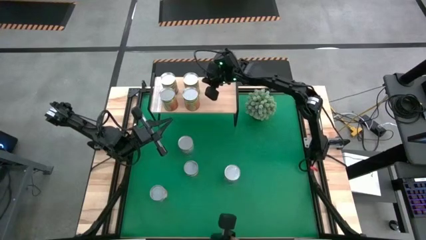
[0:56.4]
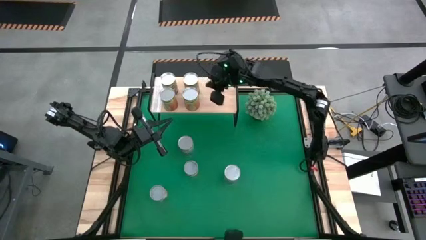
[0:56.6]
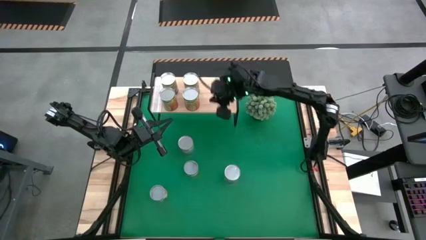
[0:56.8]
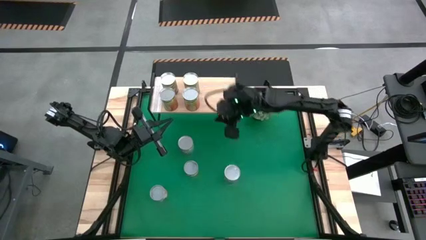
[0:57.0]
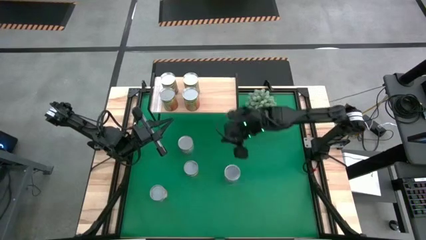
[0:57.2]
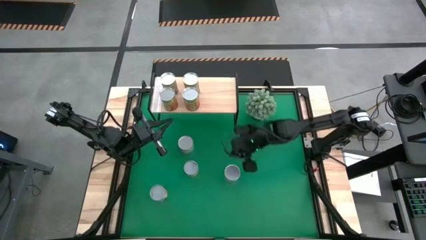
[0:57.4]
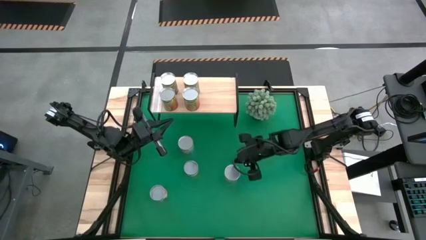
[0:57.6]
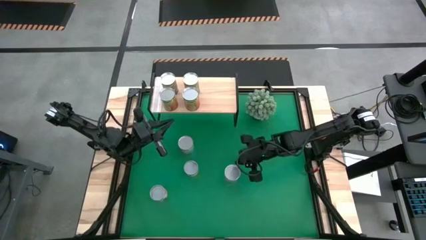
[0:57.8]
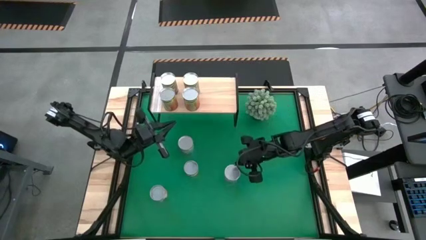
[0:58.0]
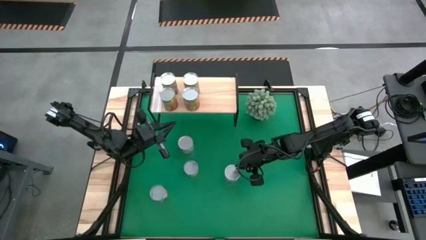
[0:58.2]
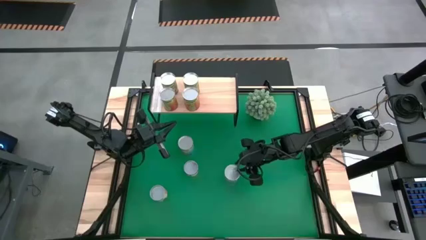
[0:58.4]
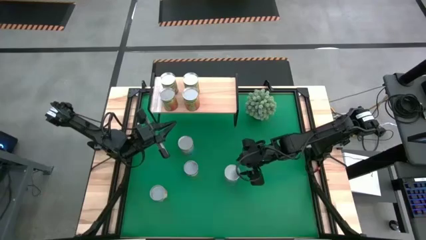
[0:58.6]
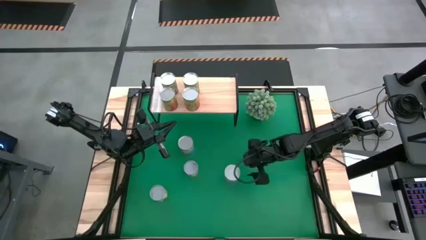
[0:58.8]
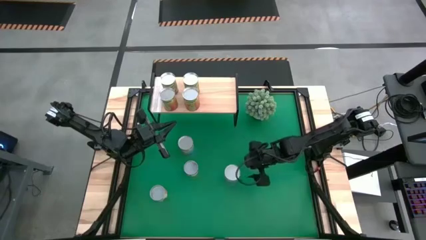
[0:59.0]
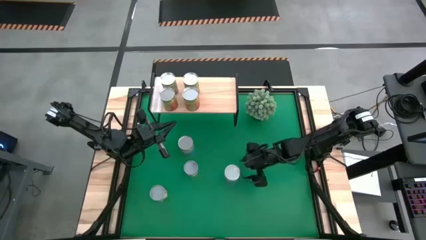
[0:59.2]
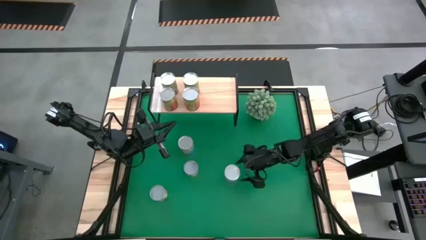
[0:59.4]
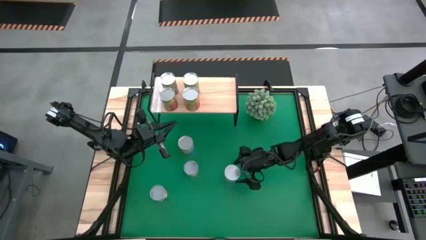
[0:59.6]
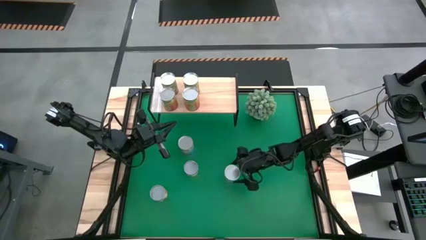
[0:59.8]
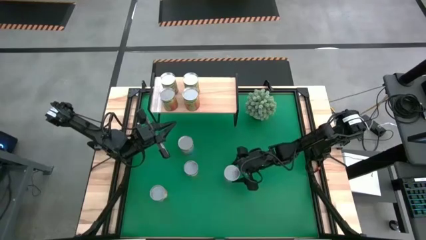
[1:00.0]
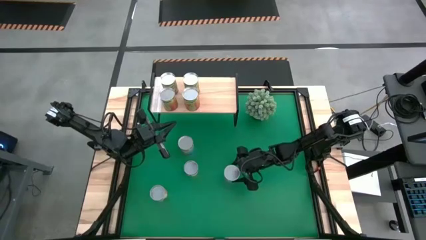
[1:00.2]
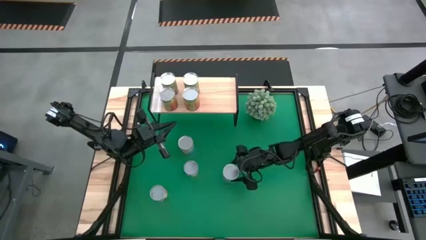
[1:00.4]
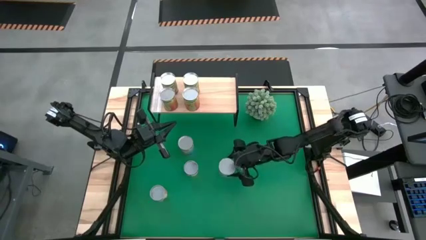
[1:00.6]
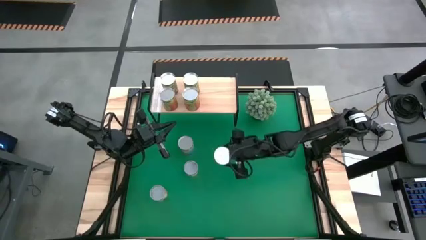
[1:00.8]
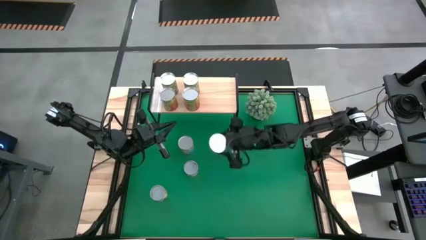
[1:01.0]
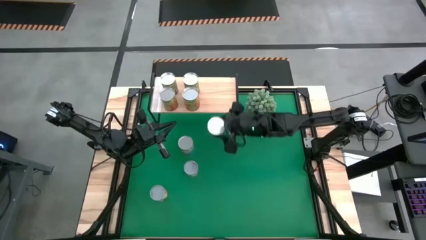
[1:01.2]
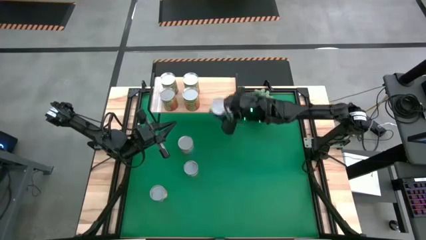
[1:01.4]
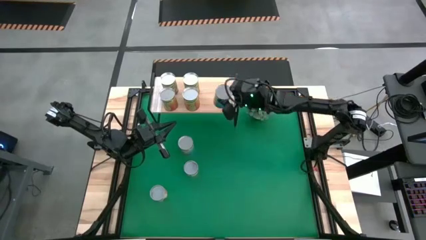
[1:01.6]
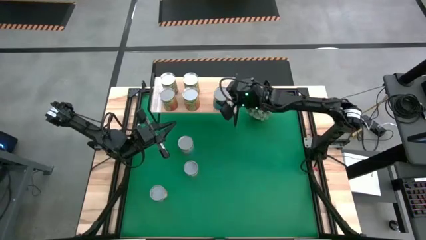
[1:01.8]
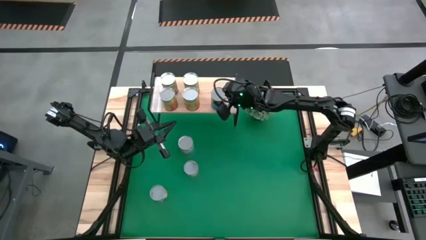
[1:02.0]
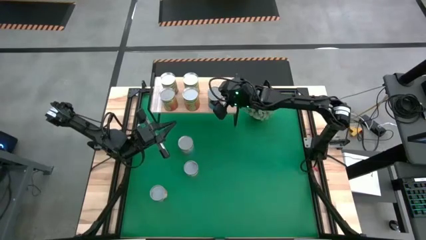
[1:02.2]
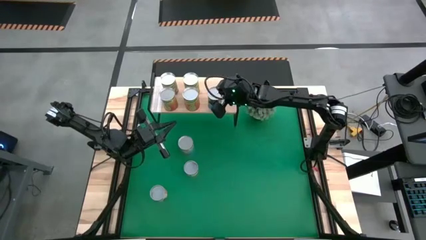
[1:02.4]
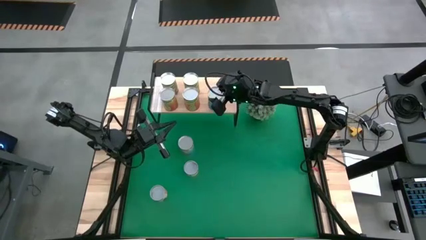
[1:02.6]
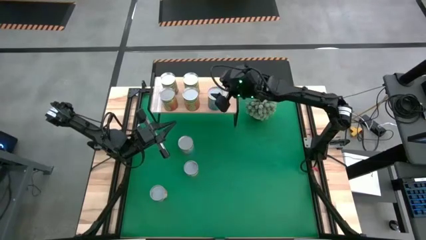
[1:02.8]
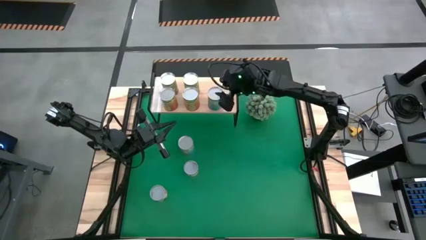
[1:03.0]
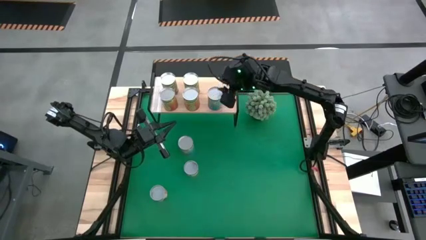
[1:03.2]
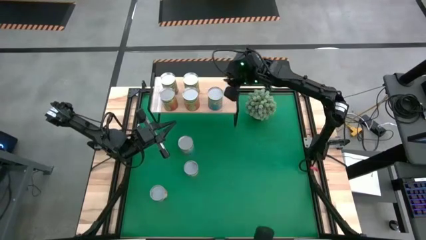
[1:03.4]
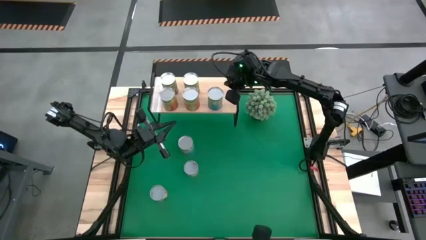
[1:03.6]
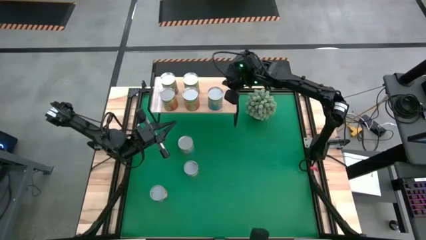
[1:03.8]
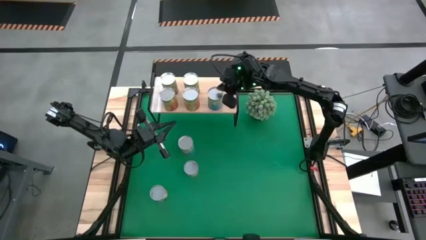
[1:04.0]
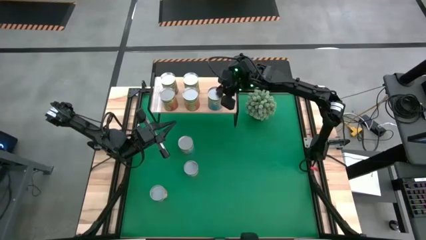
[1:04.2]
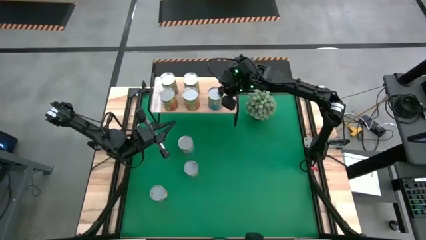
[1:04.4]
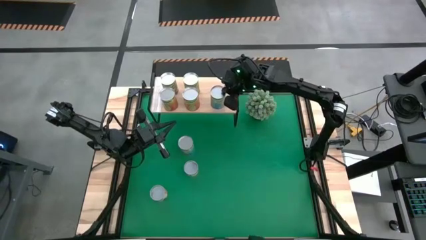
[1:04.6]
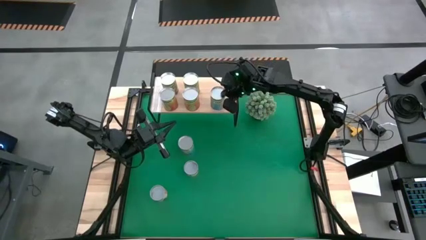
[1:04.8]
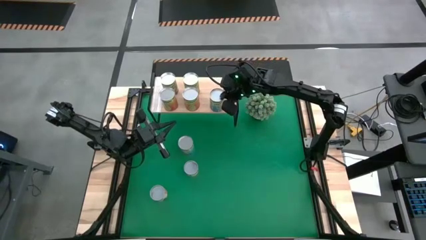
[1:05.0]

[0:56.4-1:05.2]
Task: Pick and place cans onto a shelf
Put the bottom canned cherries on the shelf

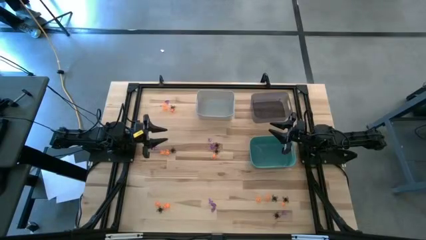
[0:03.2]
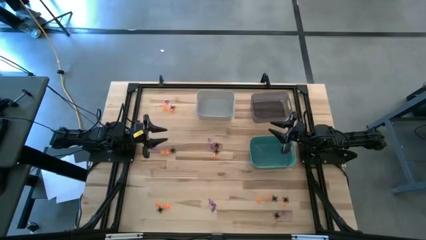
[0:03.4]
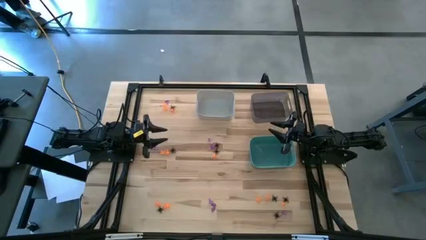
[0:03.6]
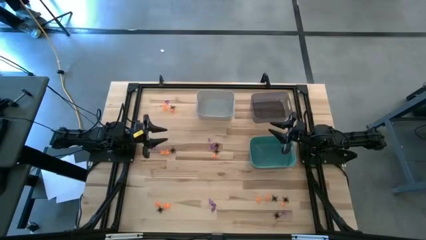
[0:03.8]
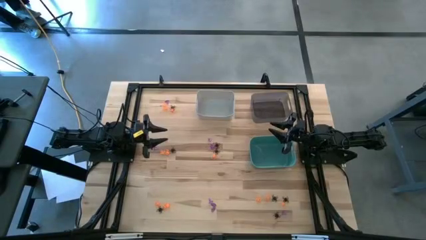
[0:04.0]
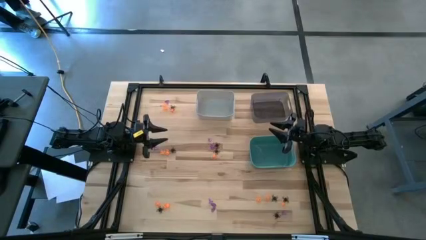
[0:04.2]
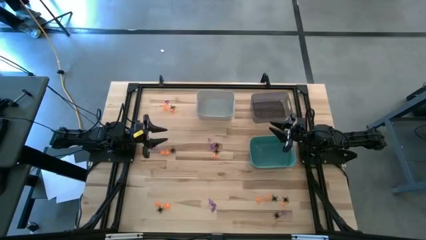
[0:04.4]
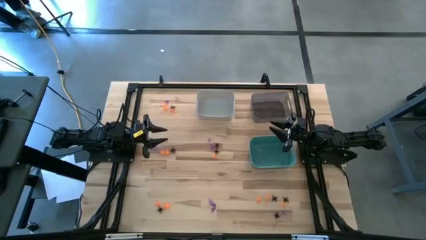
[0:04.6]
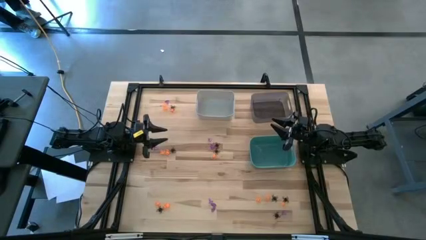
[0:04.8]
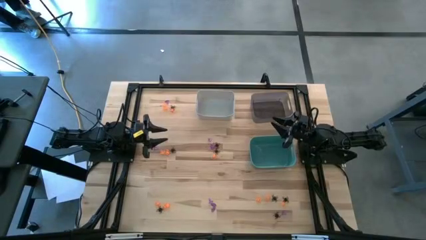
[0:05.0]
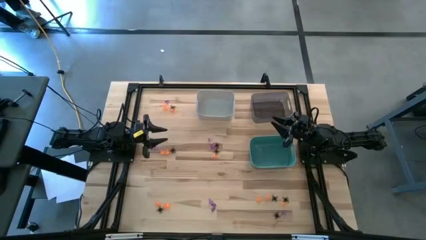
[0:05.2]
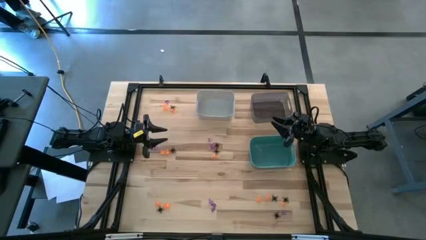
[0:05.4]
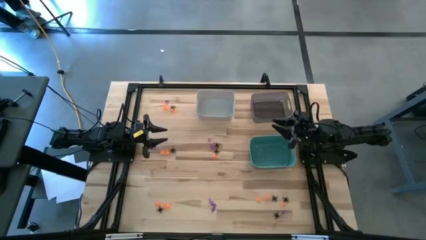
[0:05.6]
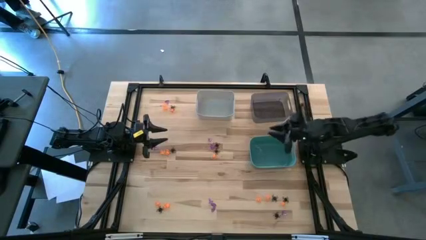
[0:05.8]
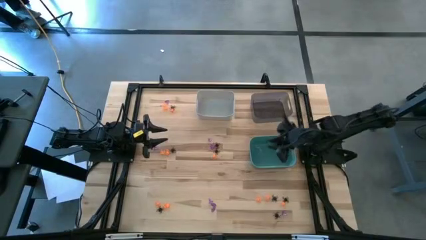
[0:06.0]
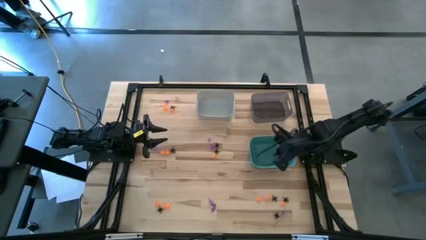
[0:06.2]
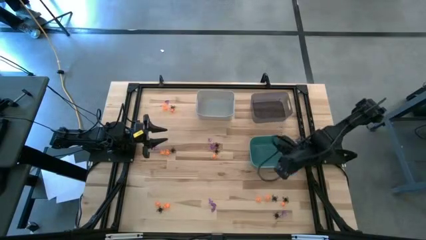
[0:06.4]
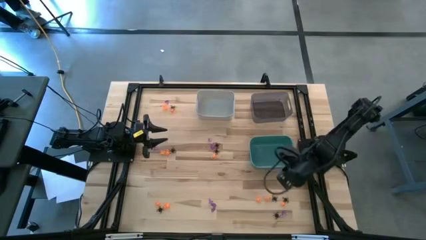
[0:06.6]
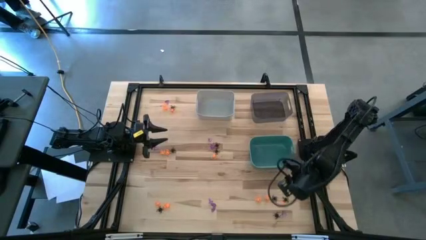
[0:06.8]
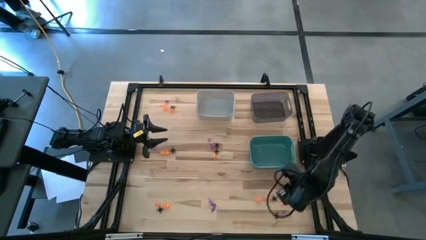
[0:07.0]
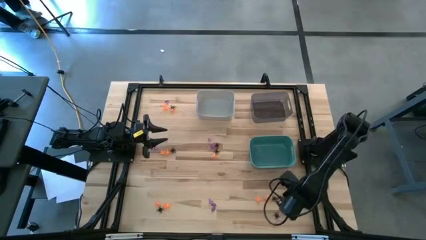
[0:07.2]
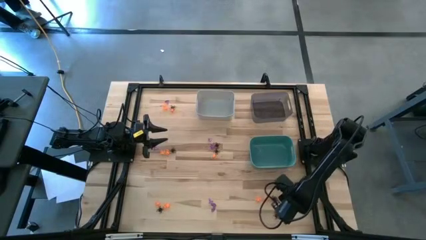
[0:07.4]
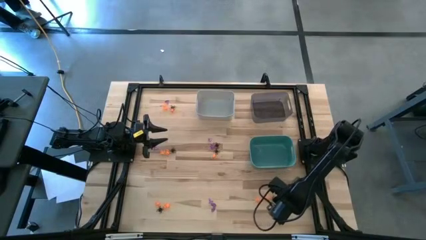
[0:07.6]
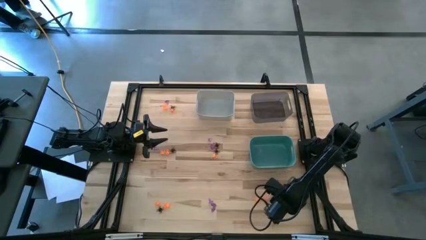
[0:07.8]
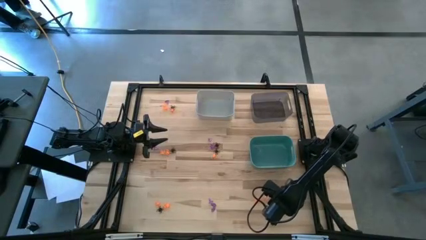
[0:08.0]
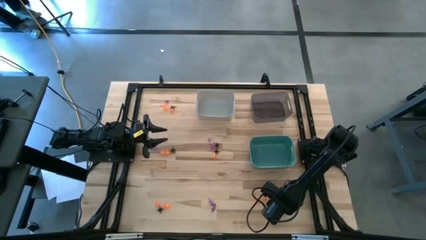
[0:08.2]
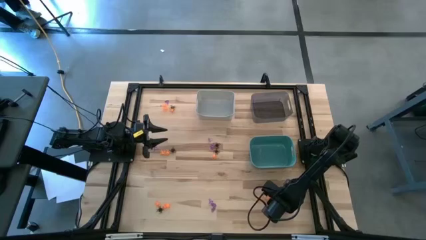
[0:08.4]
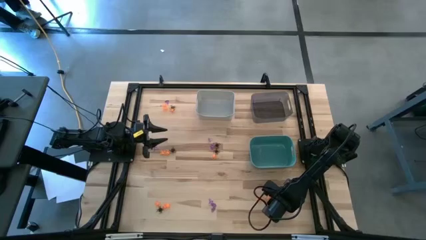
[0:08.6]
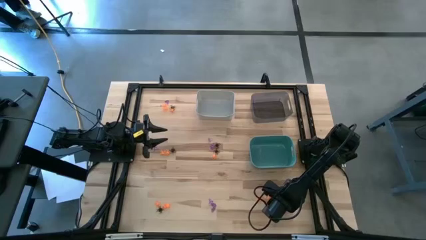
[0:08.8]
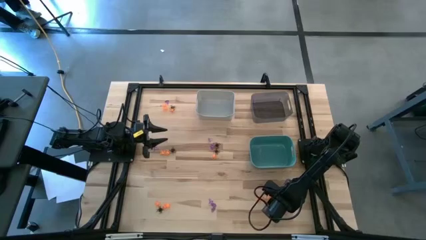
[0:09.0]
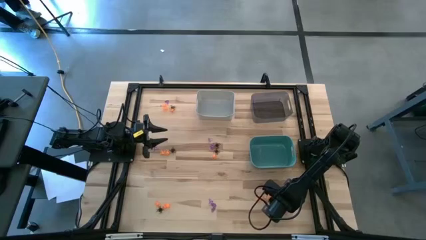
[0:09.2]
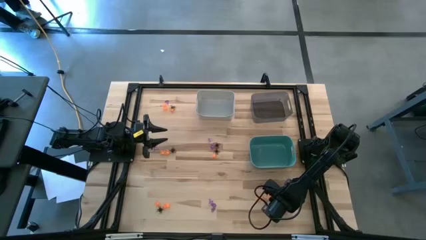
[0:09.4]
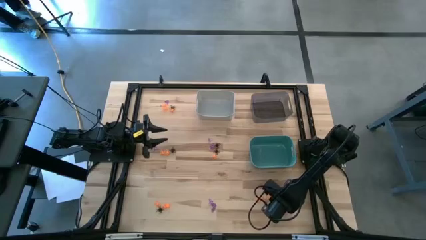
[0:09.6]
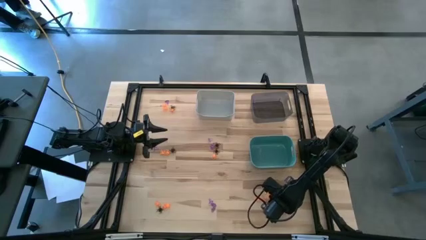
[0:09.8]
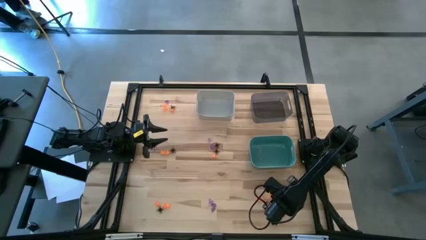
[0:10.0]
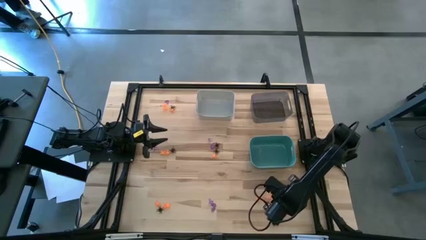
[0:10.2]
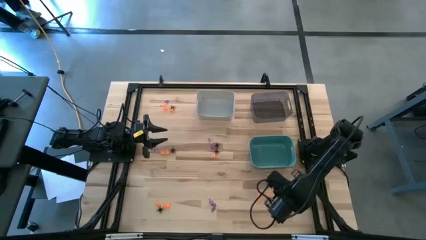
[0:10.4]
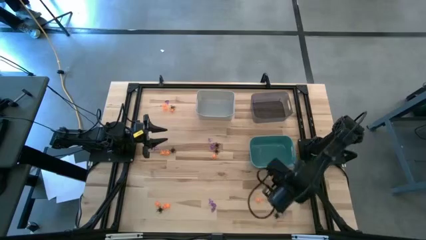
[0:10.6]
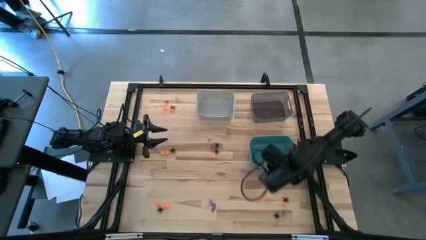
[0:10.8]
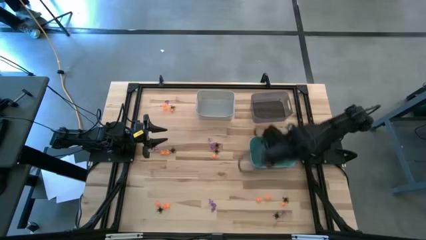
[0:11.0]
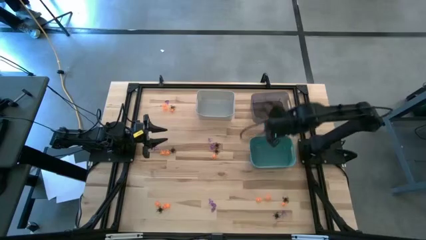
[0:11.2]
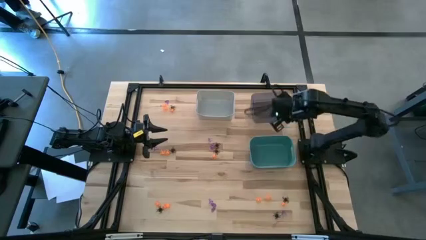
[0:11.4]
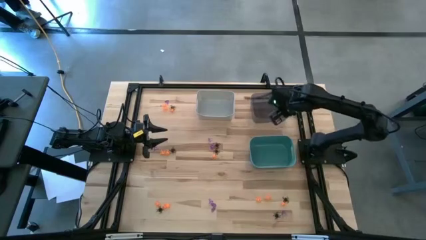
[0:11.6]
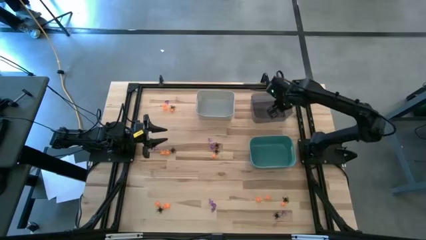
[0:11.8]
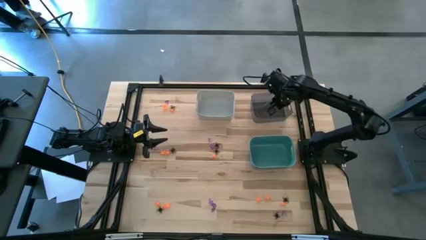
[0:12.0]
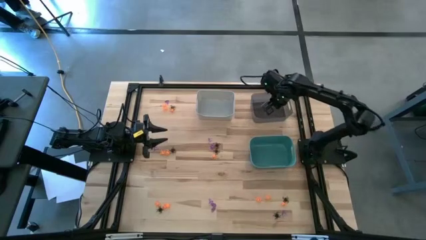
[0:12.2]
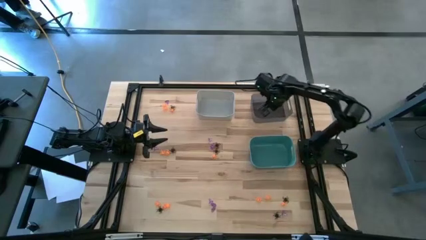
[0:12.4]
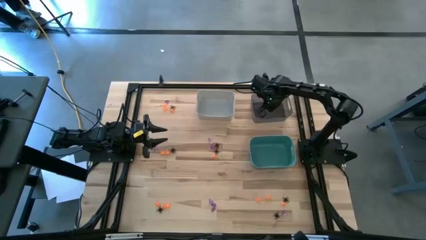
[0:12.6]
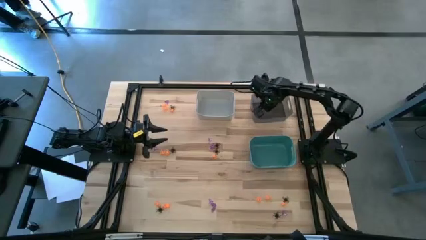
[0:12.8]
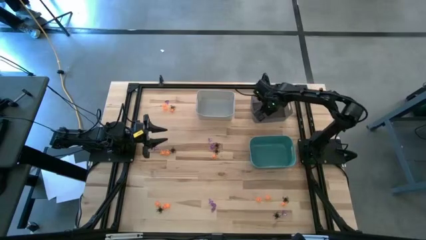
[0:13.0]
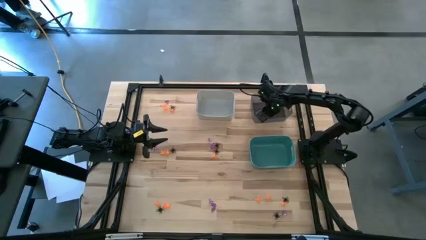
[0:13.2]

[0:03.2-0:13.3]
Task: Sort Halloween decoration
Put the black spider toy into the black bin
